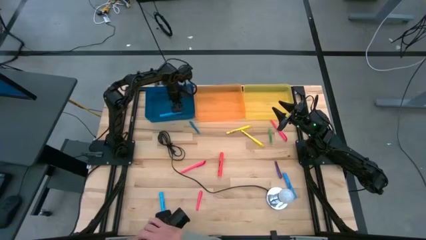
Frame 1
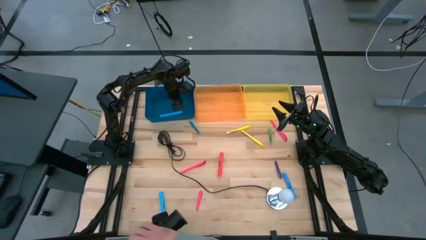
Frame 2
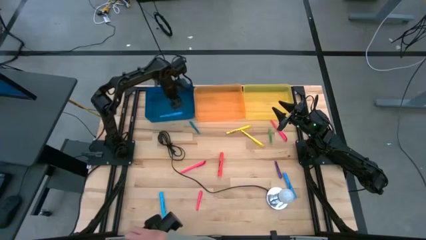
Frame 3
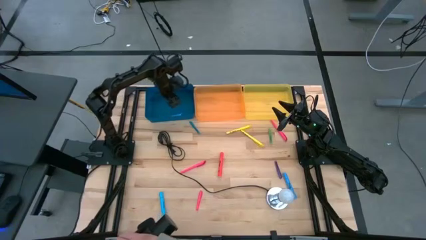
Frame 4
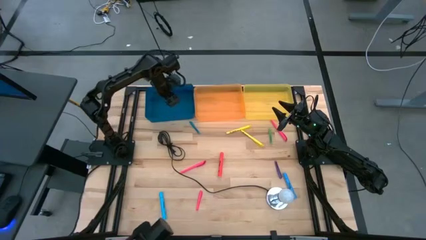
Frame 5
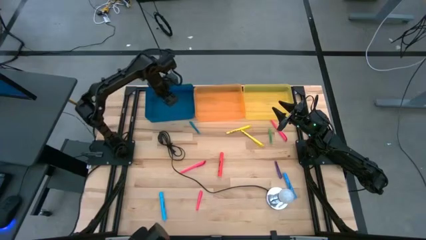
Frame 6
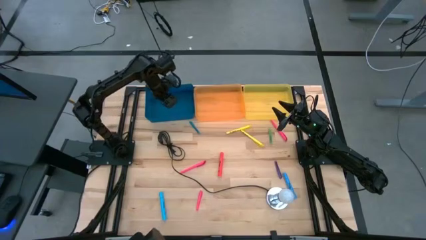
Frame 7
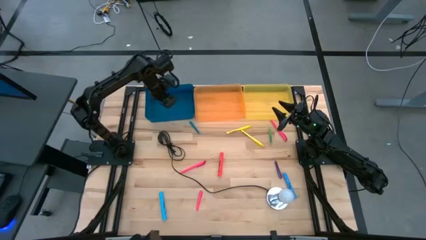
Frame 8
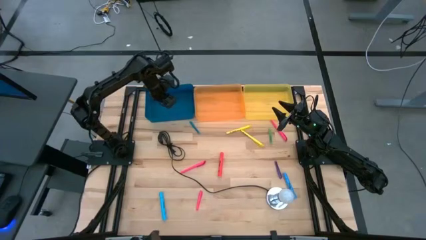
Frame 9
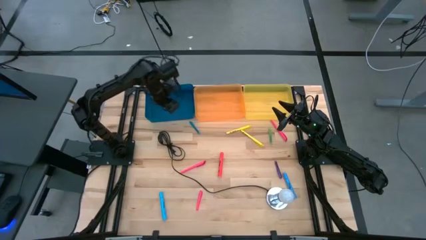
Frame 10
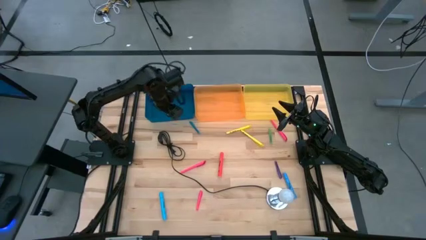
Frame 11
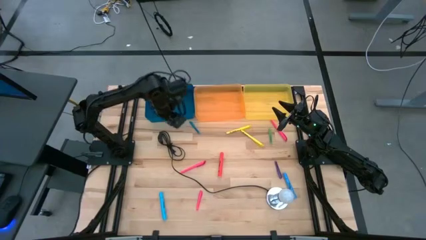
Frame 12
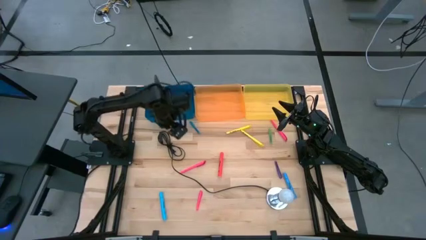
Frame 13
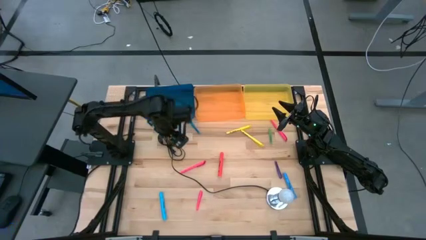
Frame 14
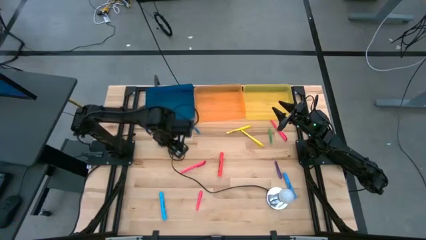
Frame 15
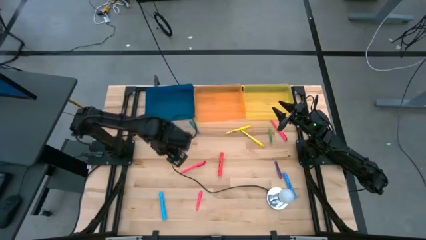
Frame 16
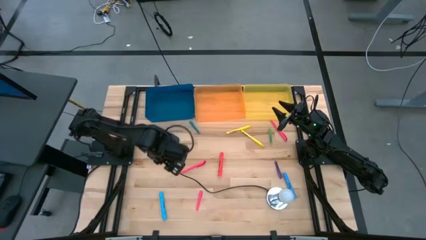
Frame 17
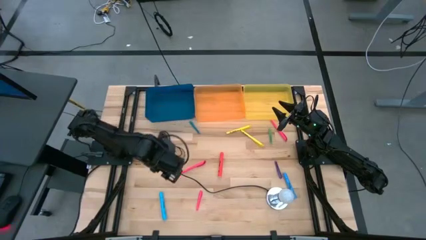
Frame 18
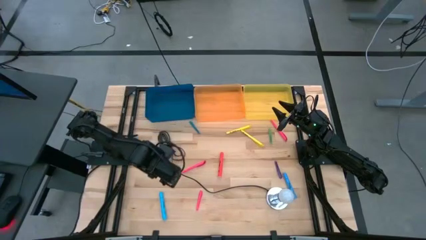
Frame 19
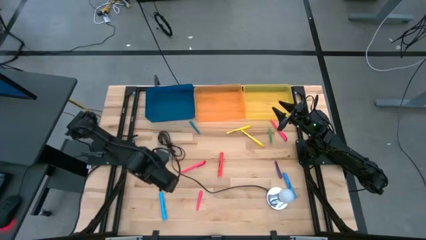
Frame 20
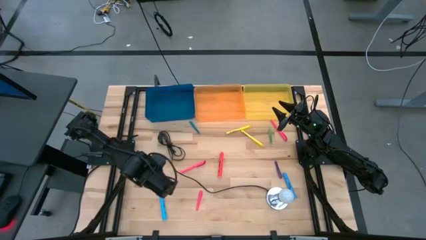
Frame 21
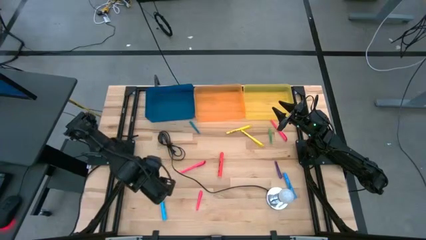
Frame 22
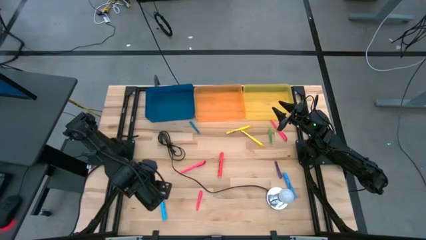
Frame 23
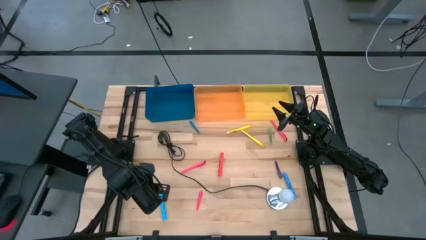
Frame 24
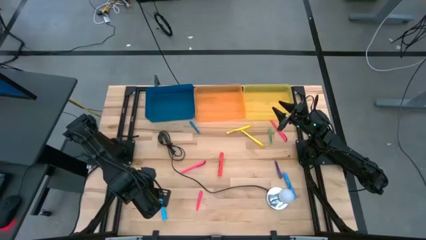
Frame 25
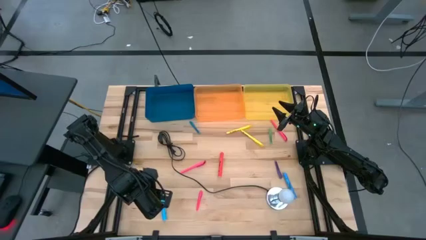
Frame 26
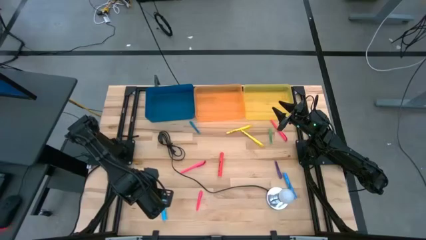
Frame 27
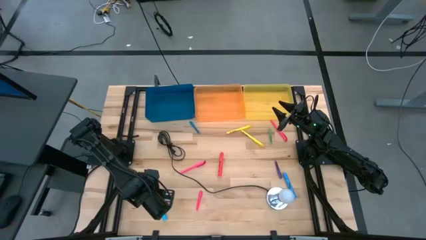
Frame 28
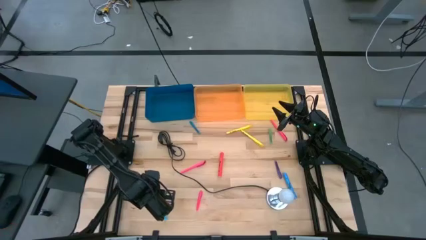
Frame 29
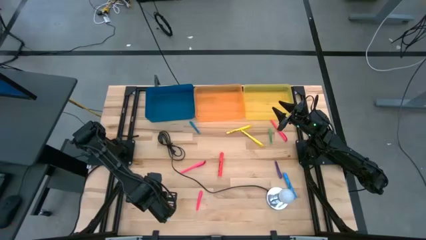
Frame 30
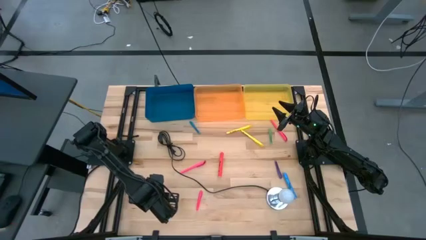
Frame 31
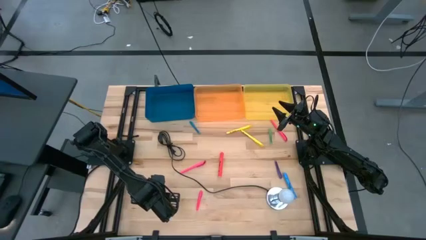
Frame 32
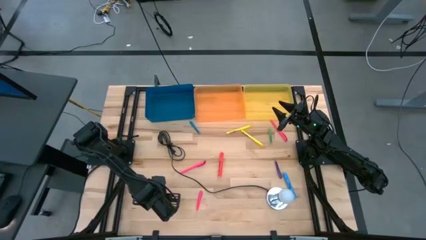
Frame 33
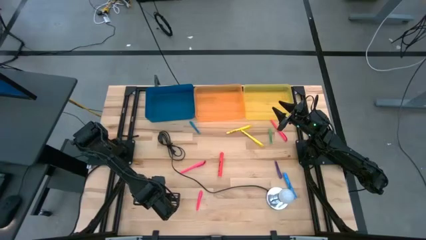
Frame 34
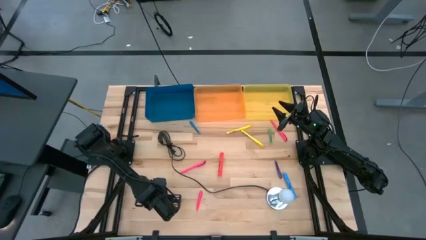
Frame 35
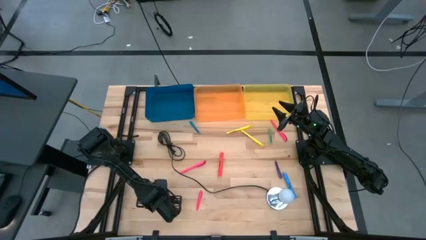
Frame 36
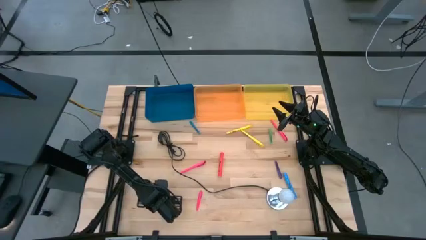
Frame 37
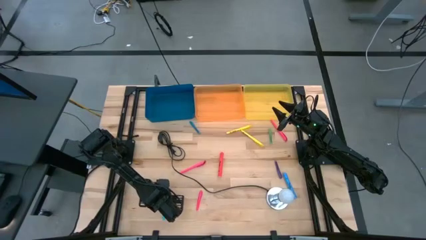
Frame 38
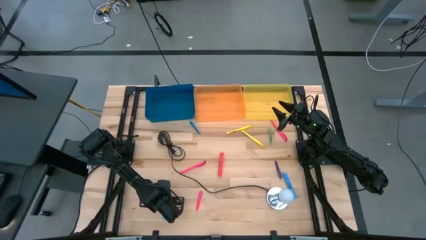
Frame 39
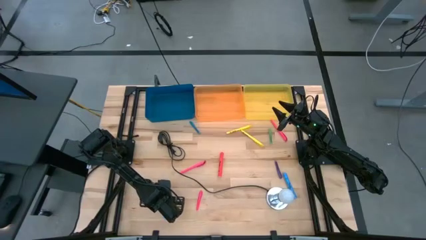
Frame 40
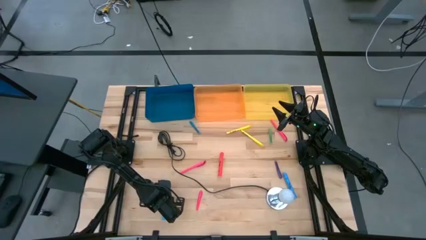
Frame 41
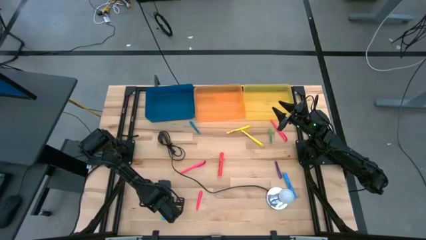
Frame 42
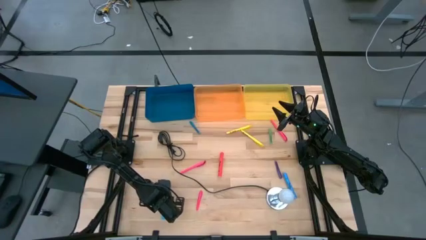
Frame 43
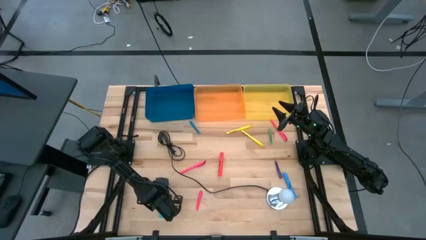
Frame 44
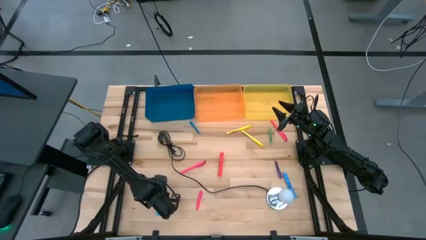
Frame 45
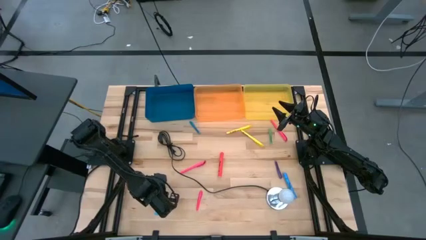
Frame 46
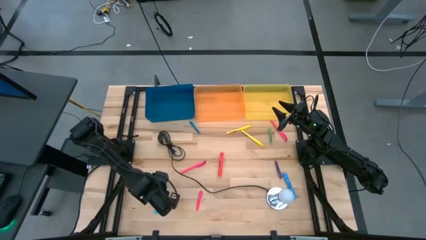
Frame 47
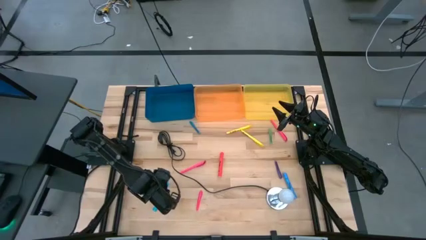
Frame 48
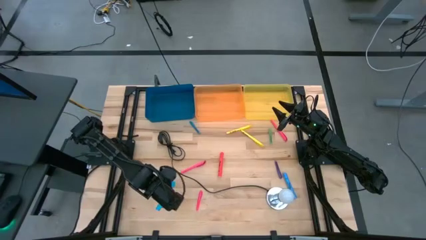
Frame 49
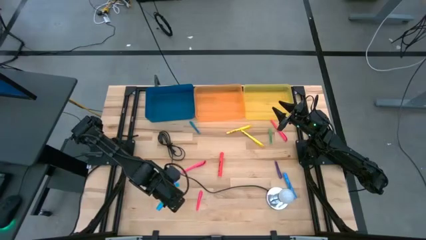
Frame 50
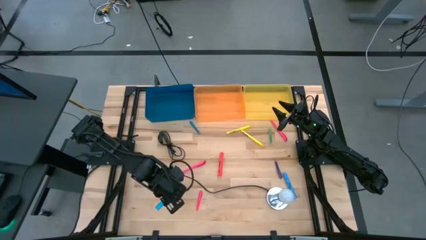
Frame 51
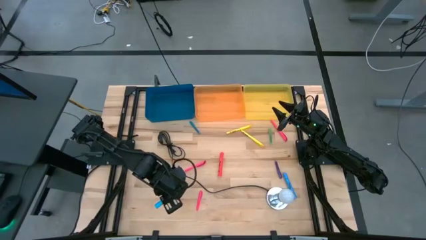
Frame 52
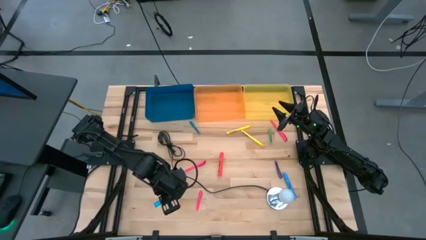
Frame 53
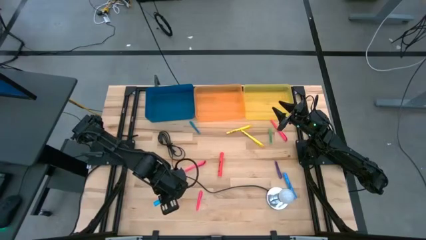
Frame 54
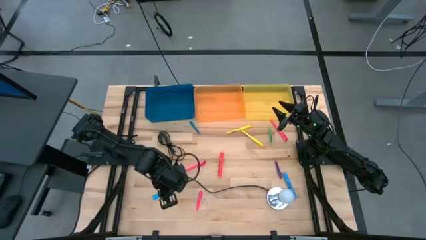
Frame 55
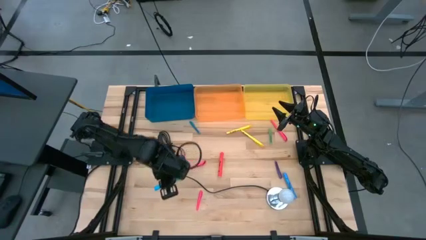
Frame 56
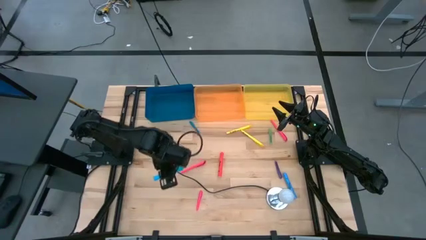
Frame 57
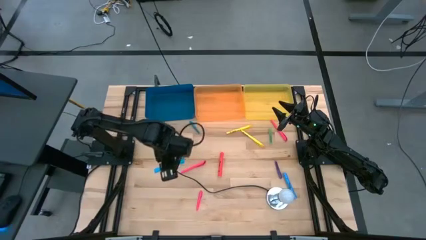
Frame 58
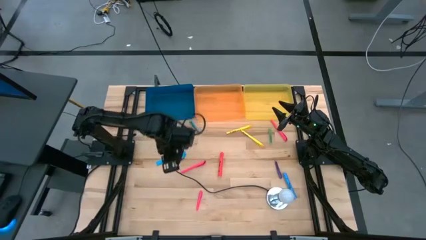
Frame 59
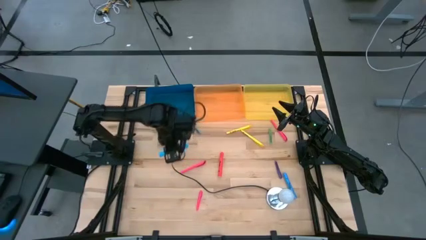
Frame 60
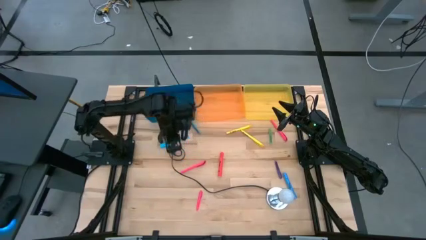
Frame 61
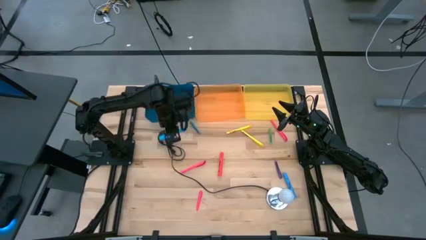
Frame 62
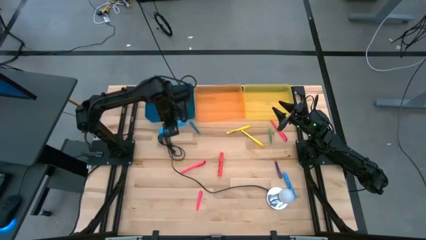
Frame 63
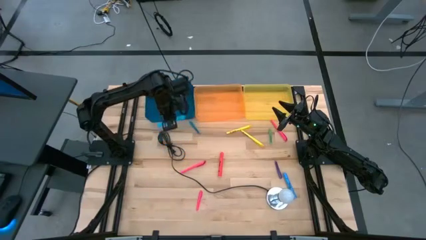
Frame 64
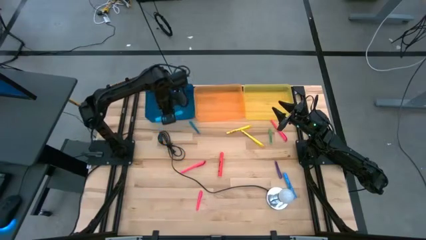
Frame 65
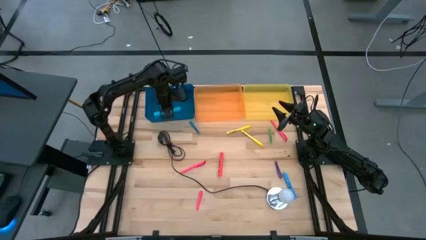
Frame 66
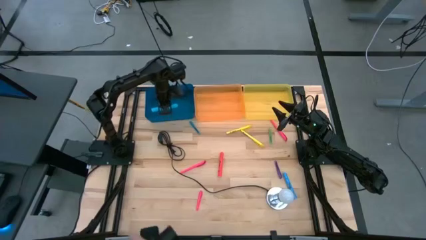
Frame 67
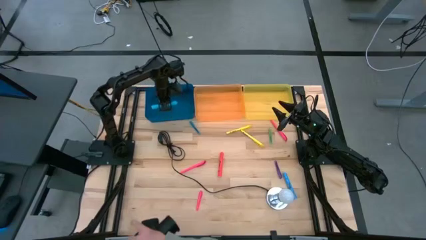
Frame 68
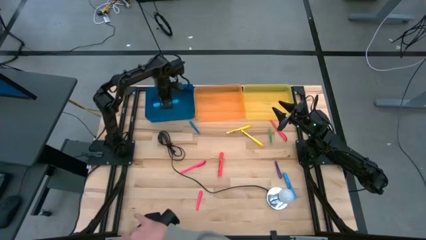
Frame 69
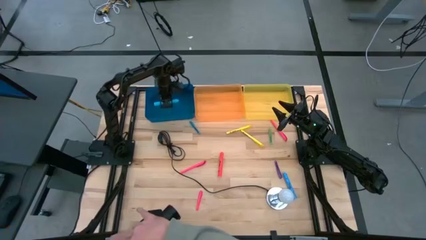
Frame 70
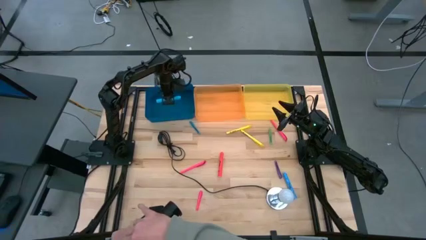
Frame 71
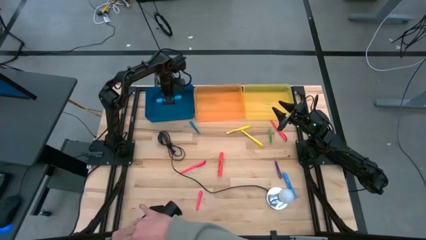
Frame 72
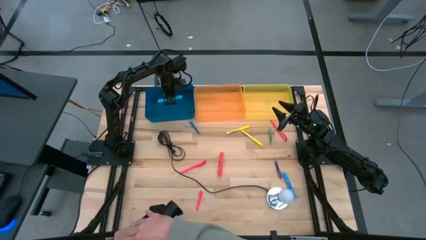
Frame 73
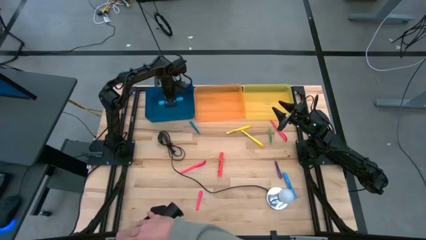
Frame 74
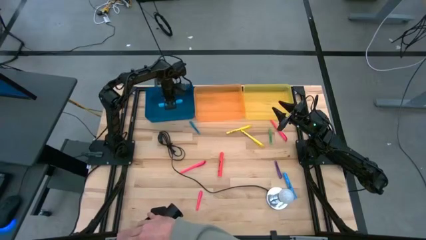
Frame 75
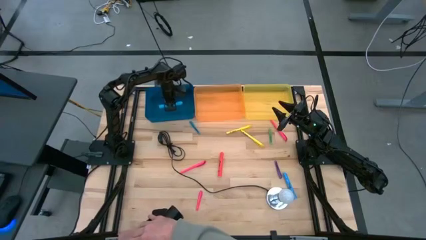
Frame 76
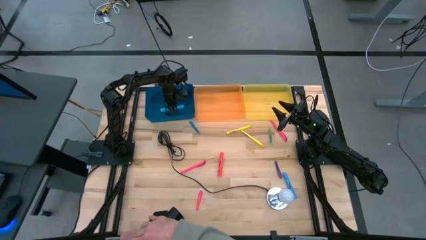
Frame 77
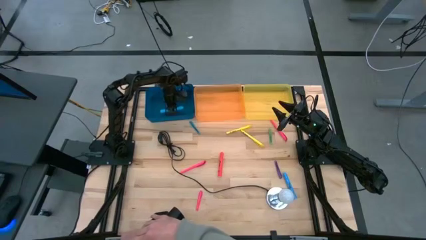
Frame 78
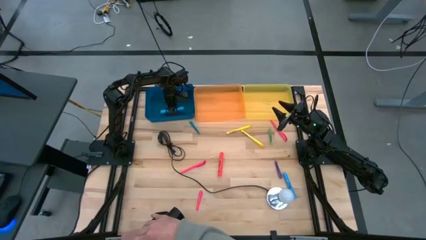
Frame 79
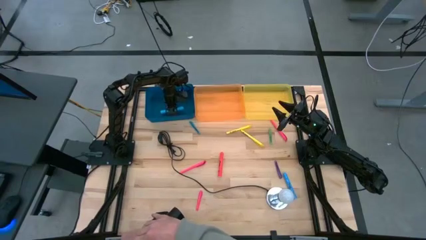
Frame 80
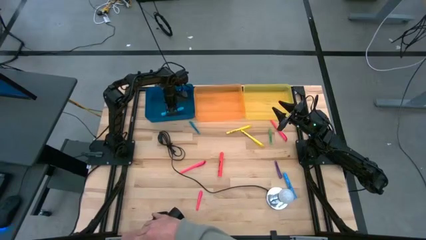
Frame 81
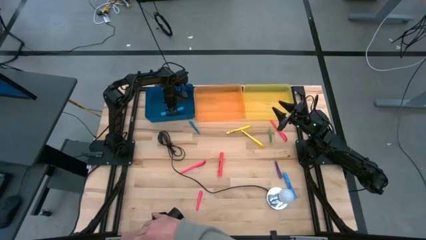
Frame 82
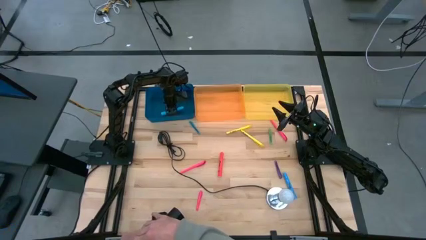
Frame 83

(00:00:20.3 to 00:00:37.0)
Task: Pick & Place Markers
Put the left blue highlighter pen into the blue bin
